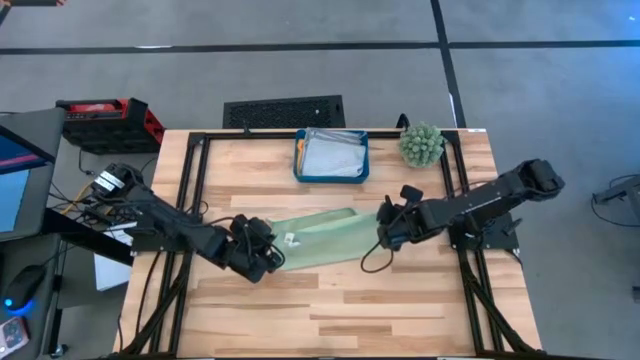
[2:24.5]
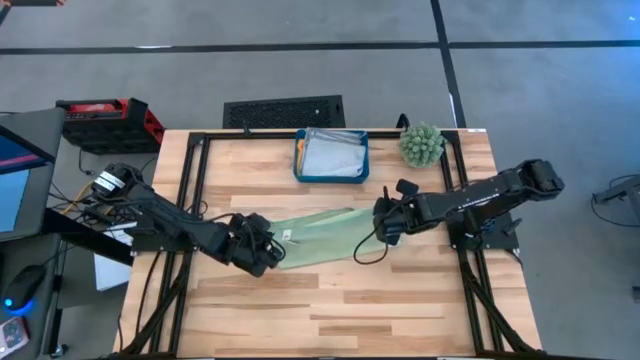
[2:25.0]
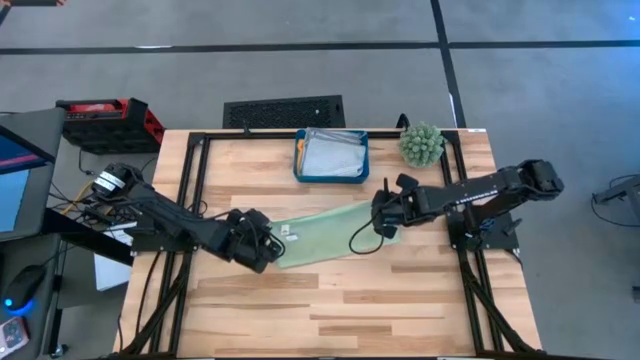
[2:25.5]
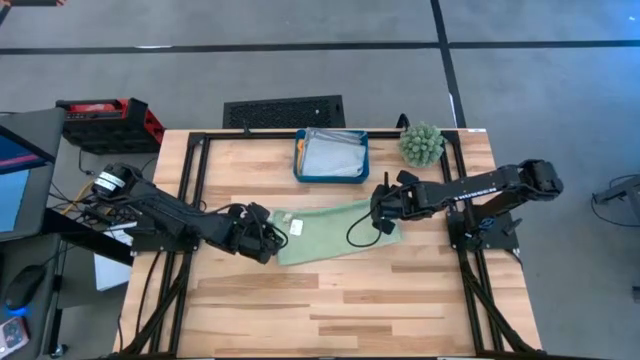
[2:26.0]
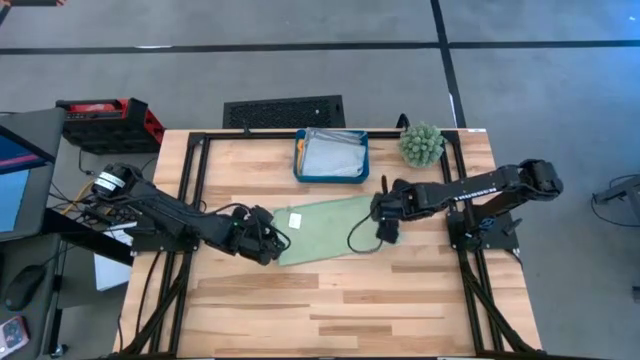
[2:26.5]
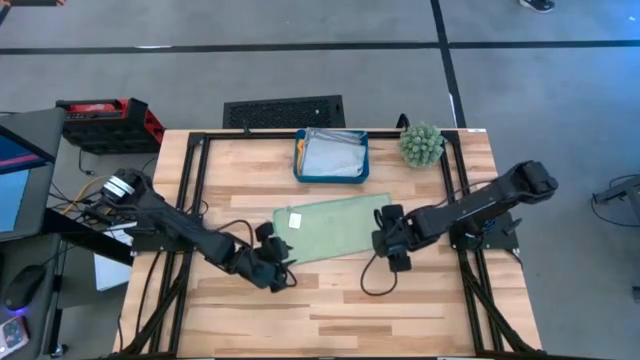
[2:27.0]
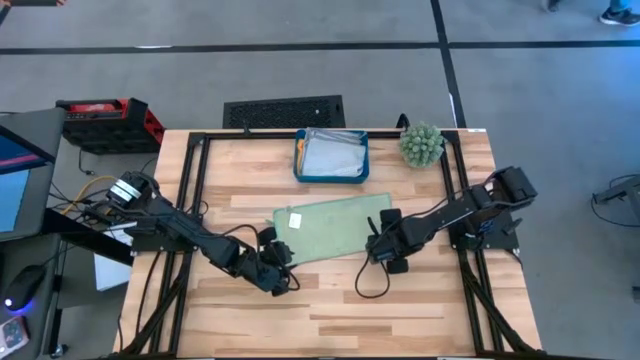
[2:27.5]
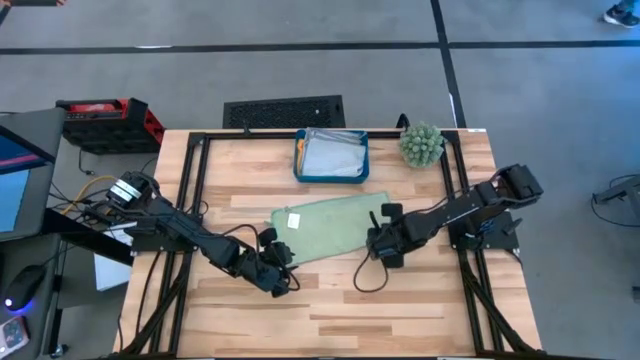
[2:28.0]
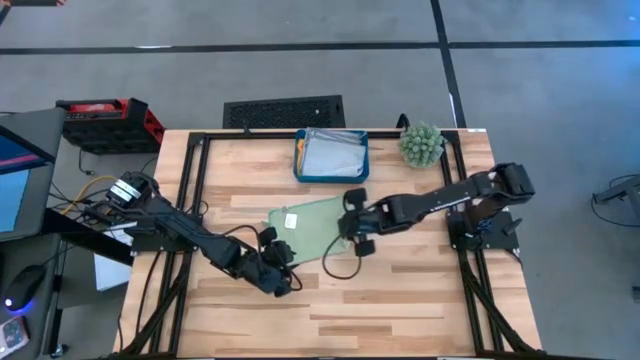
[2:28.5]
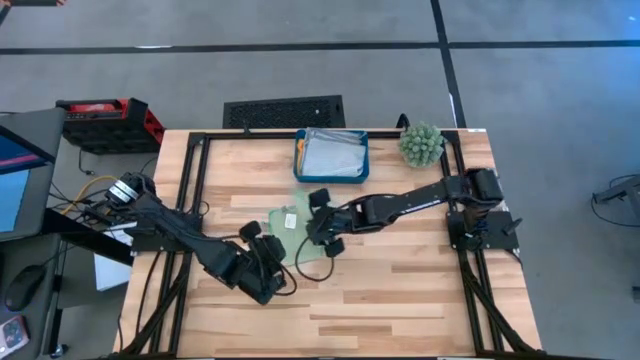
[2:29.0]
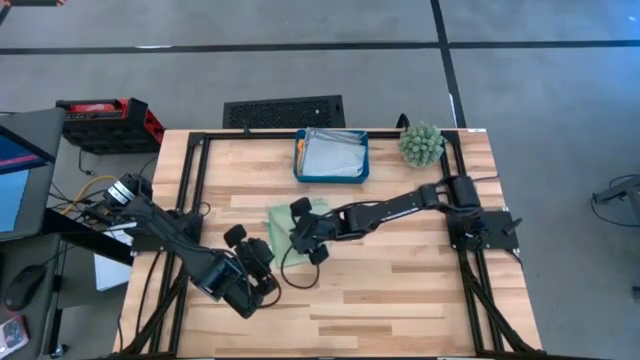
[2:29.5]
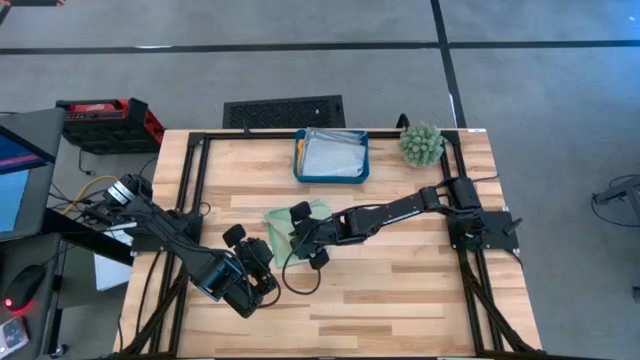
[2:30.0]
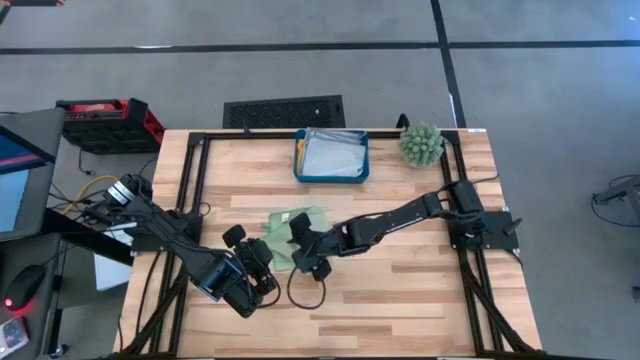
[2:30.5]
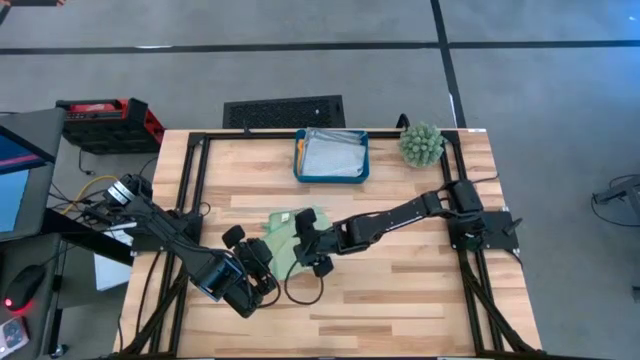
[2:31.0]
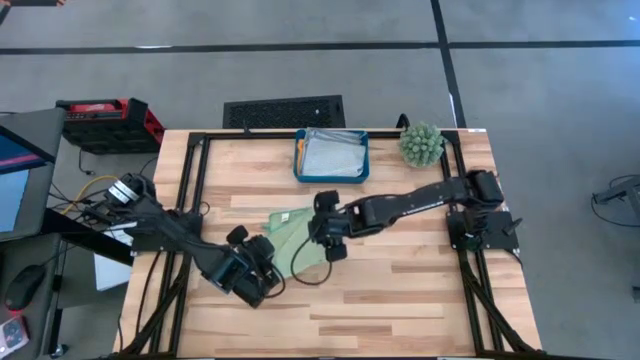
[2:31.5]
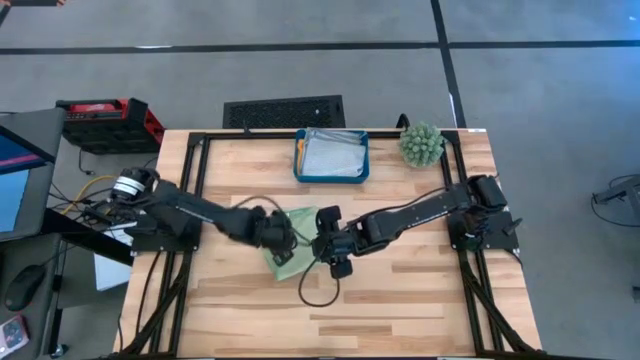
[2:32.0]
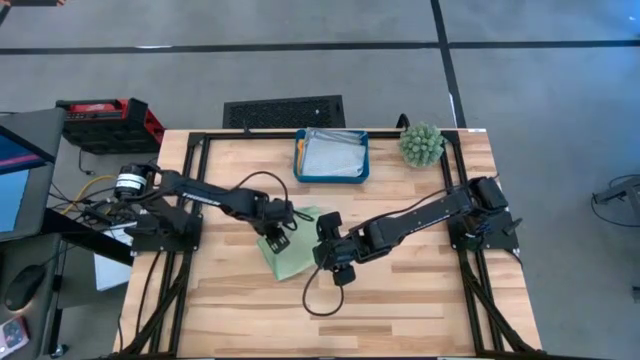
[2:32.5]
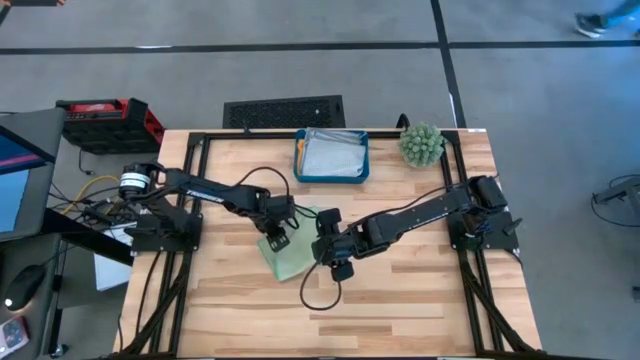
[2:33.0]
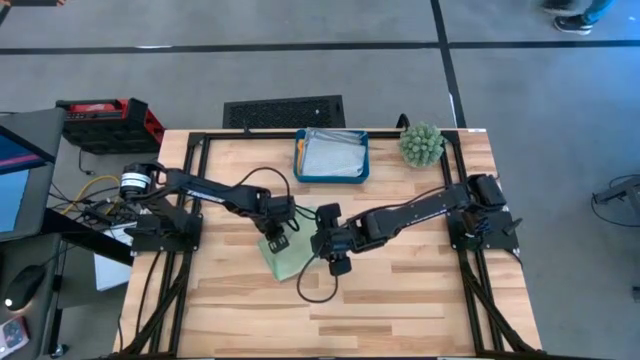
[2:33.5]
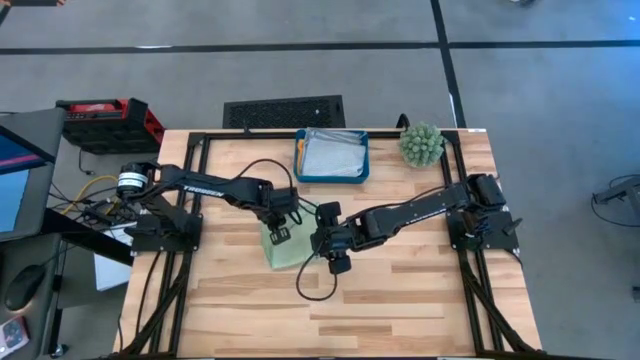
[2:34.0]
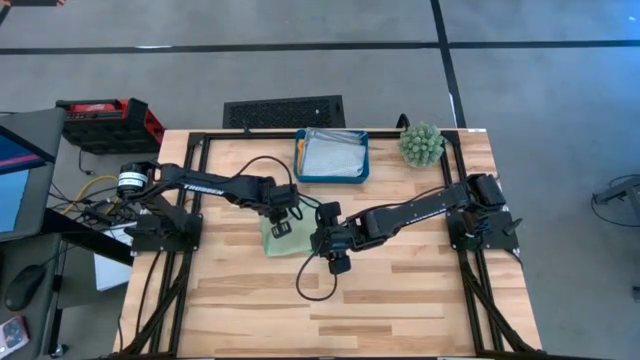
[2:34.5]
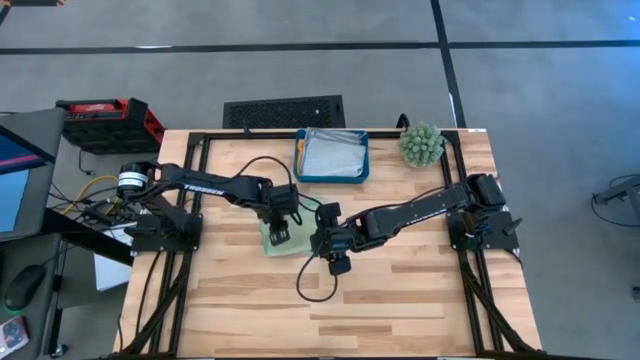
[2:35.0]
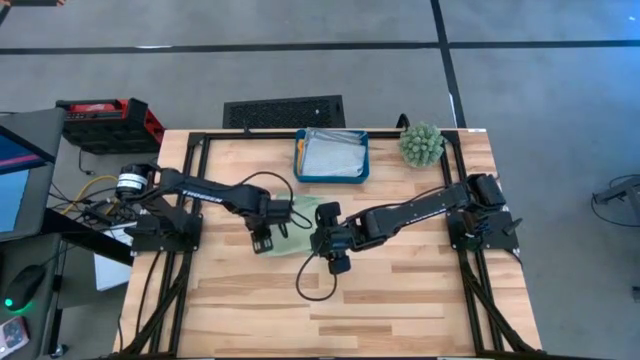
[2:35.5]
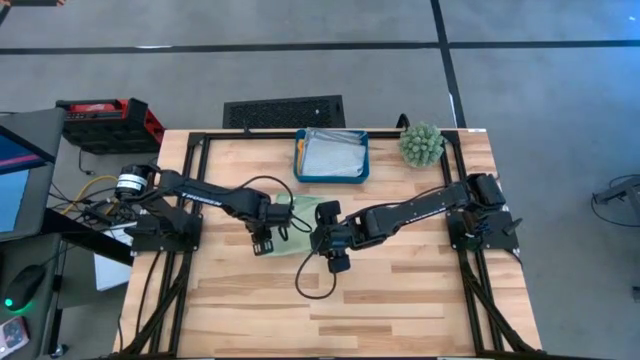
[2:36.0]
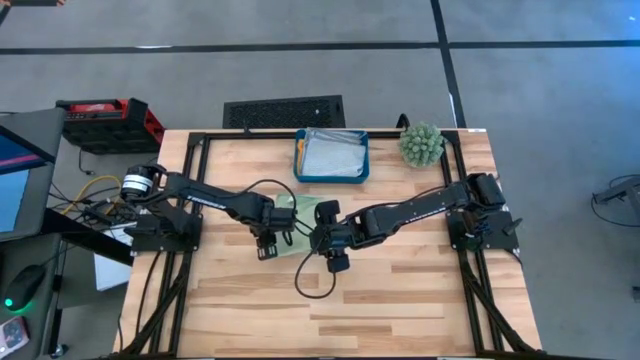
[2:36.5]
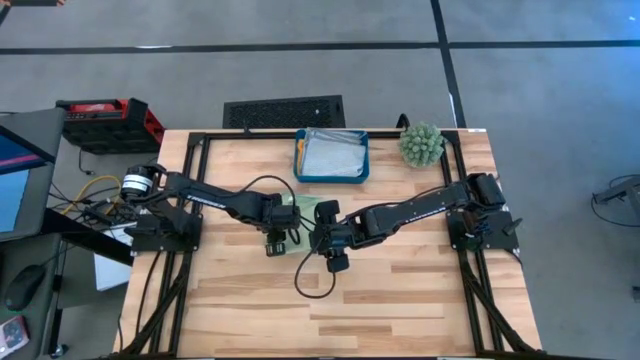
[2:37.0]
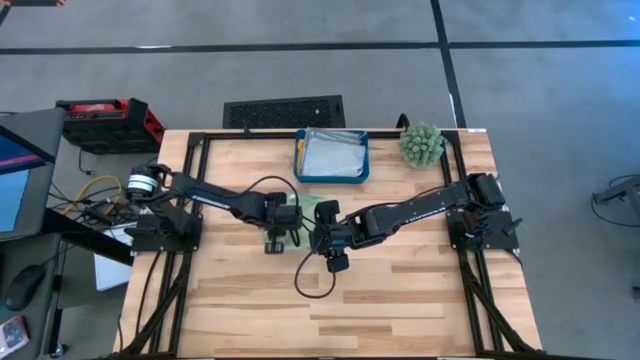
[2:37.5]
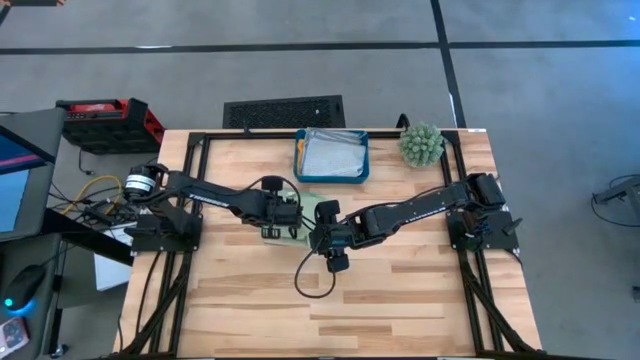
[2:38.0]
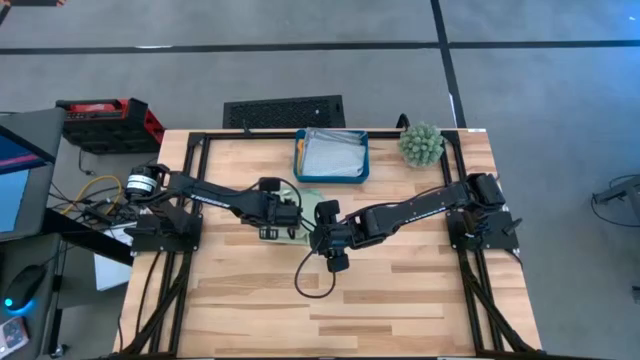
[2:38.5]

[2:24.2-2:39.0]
Task: Fold microfiber towels
Fold the green microfiber cloth
